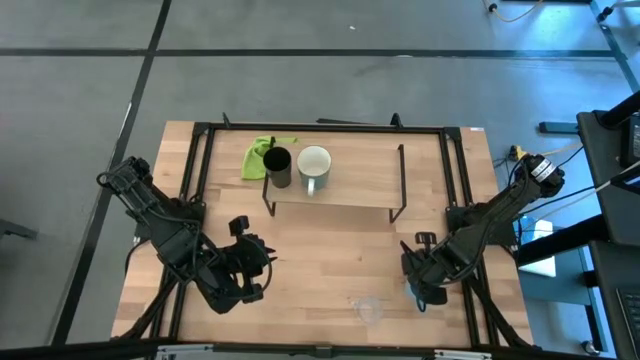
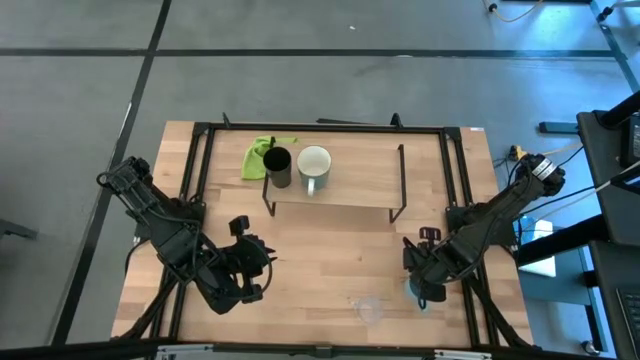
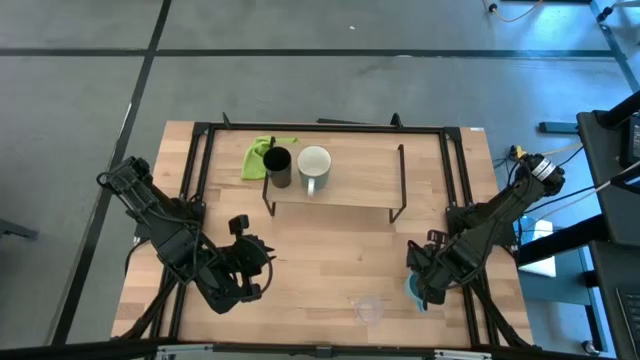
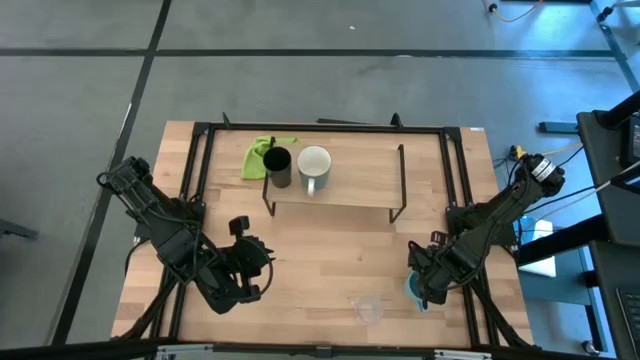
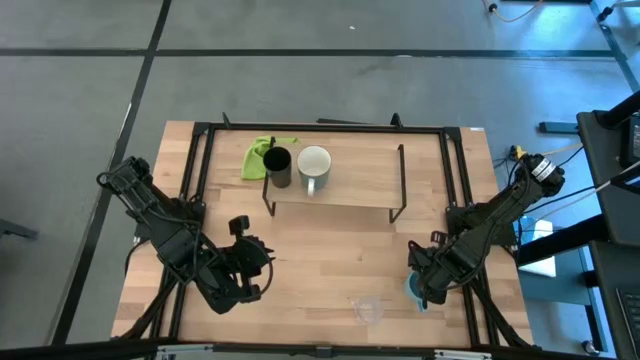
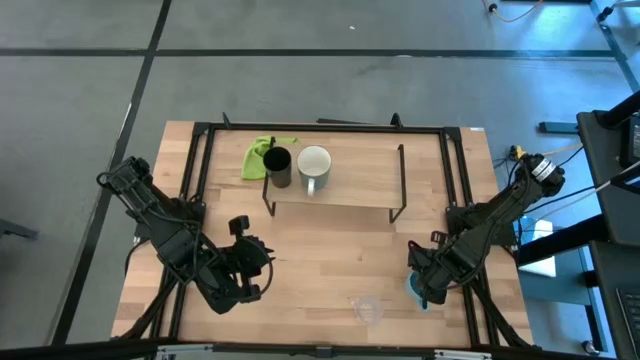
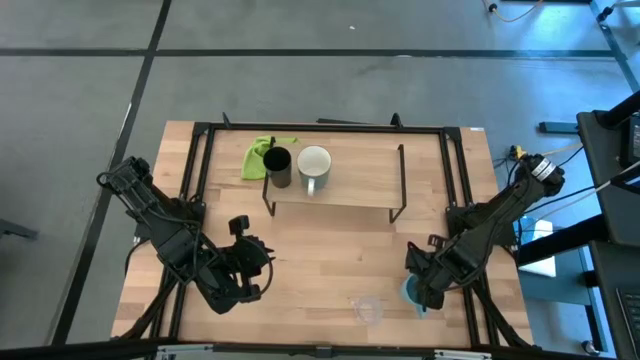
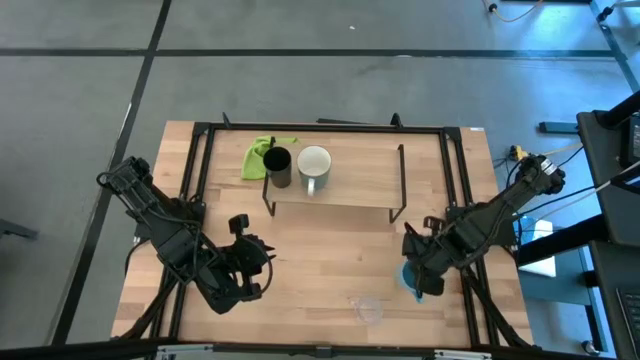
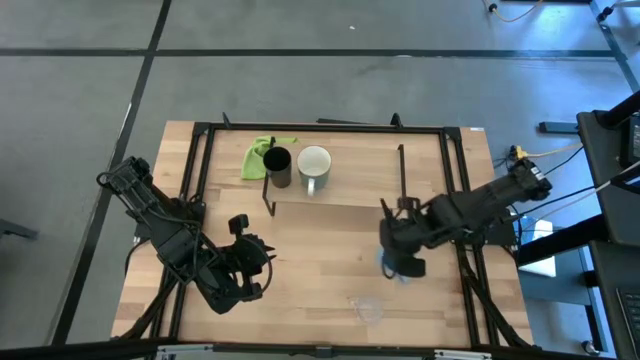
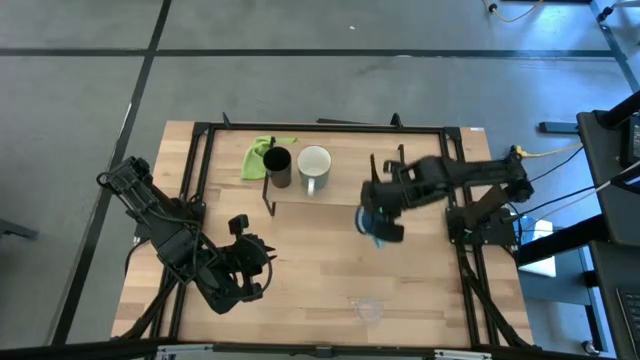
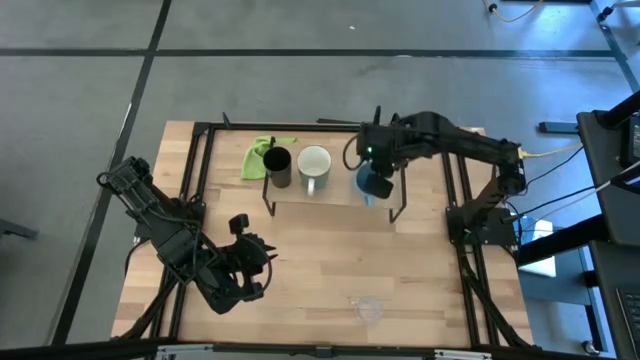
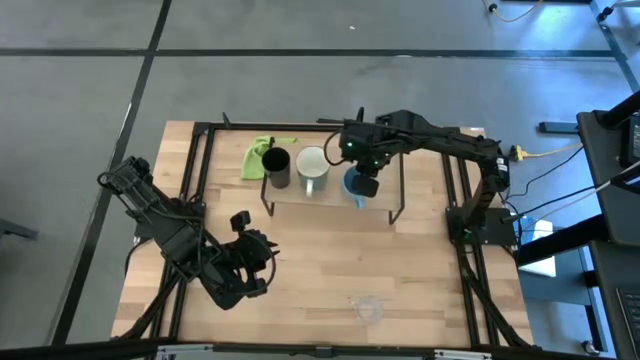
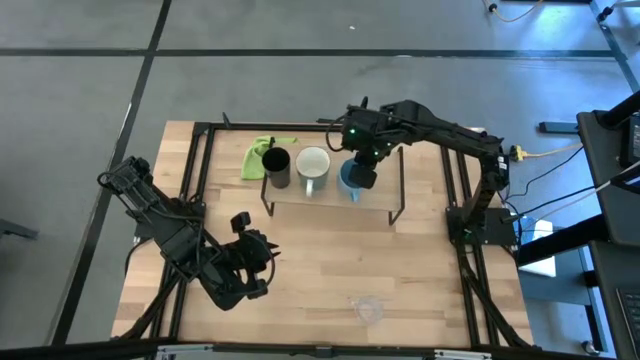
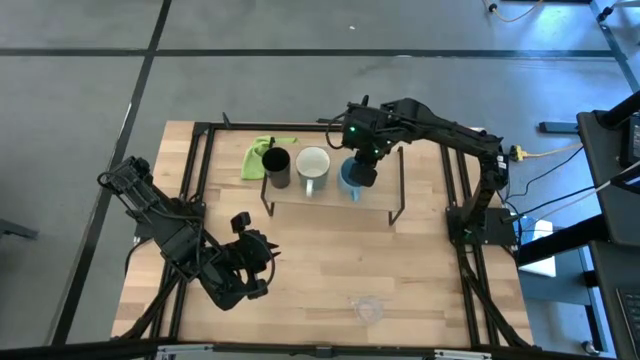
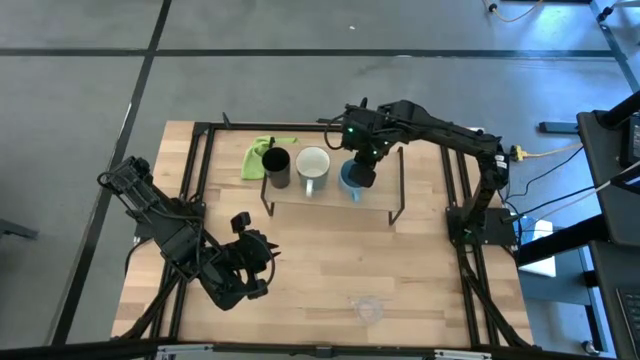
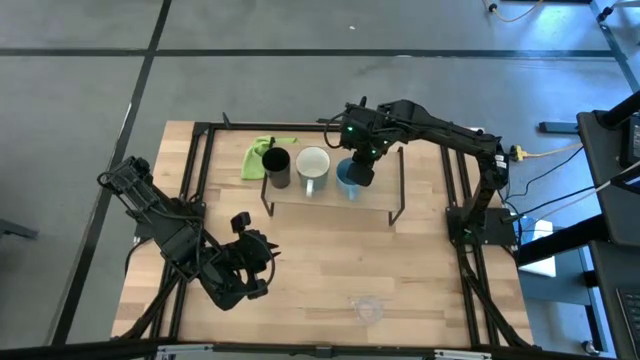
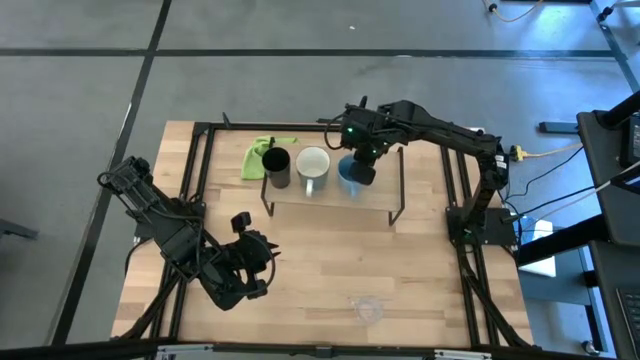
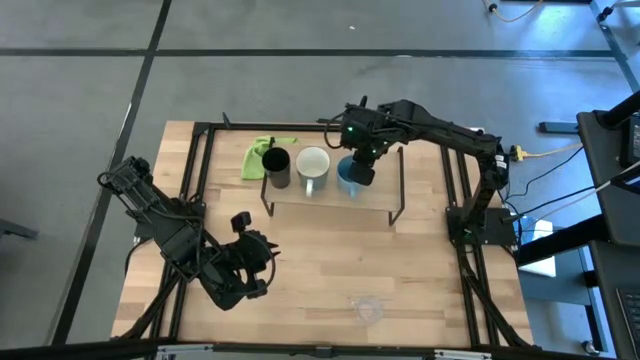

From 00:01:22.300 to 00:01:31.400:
Task: Stack small to large cups/mugs on shelf
Put the blue mug on the shelf

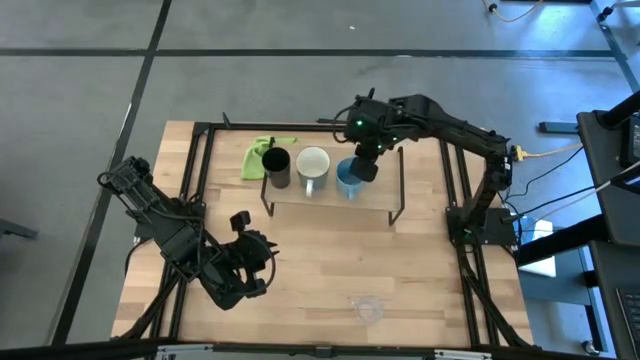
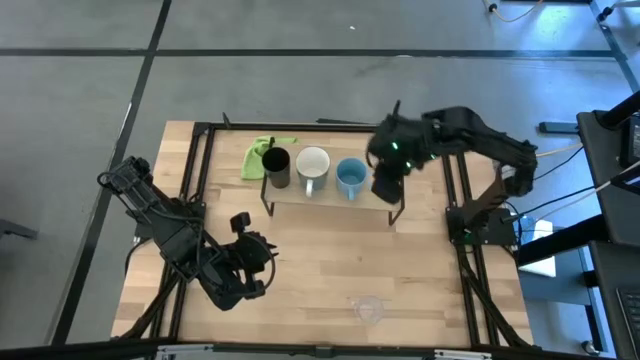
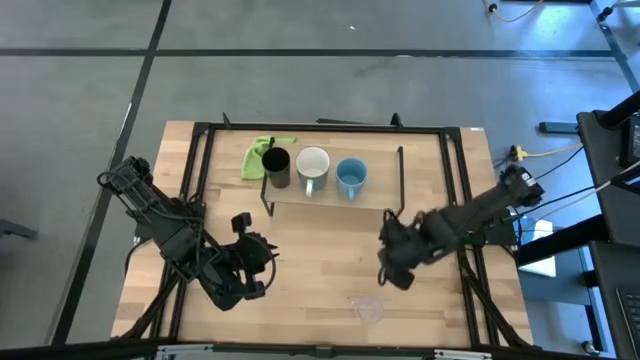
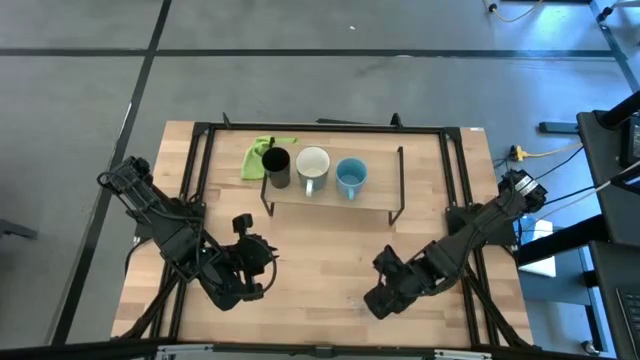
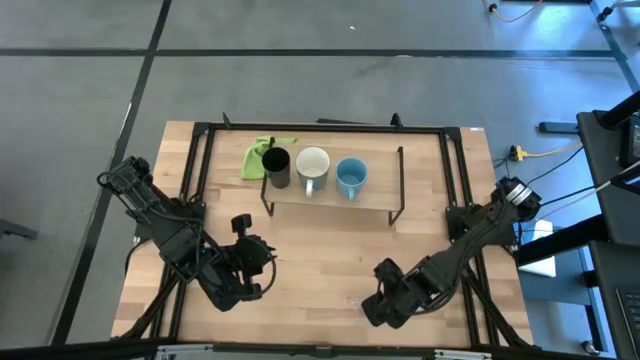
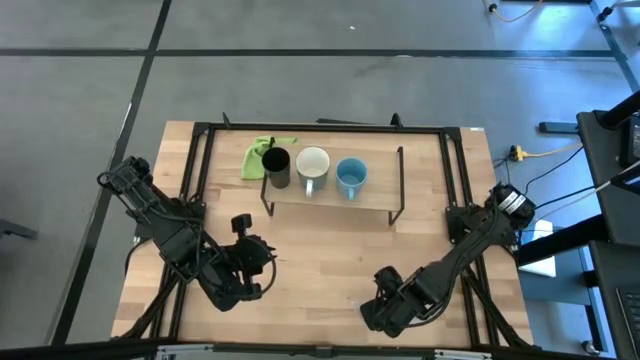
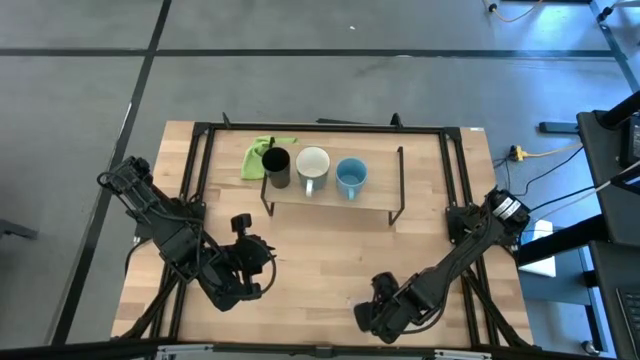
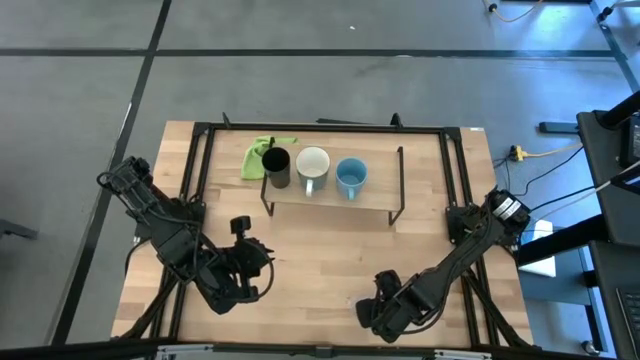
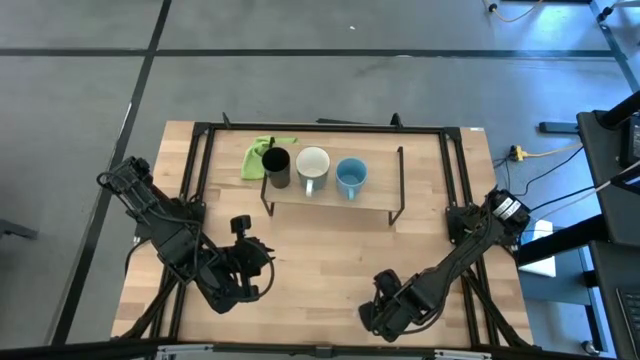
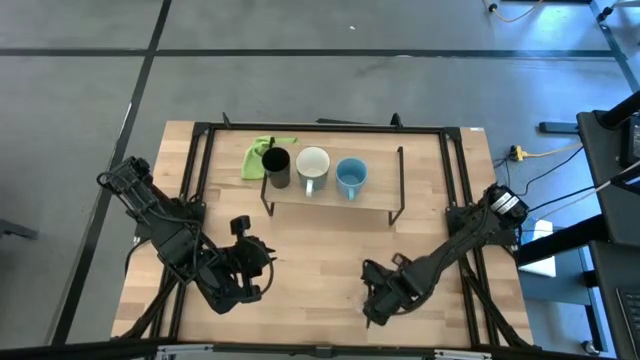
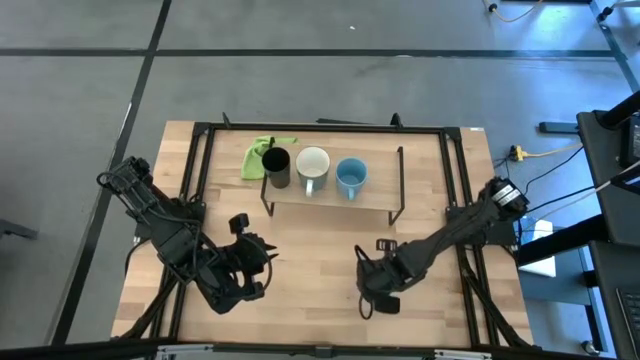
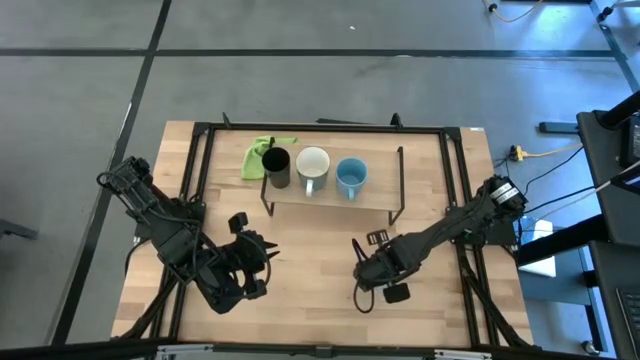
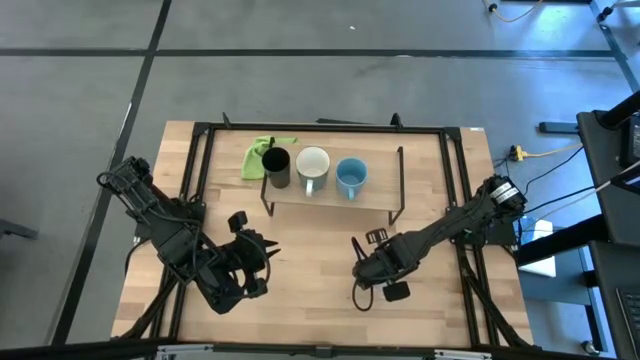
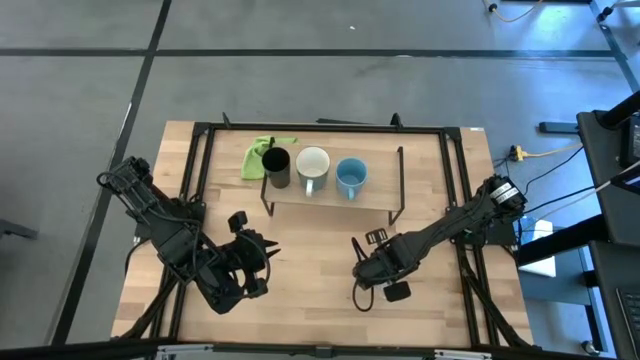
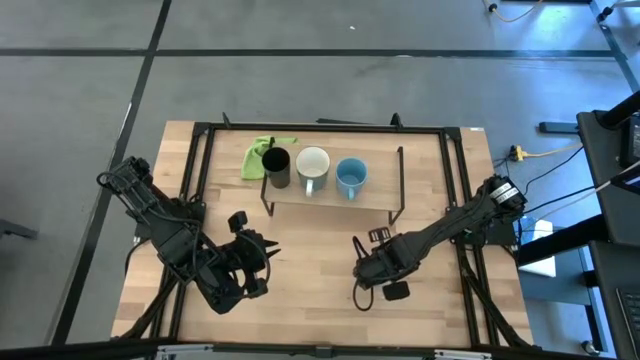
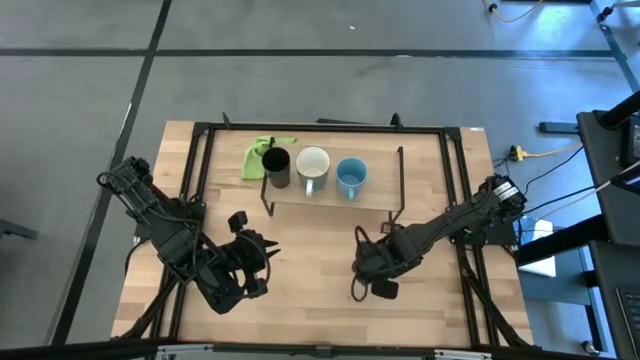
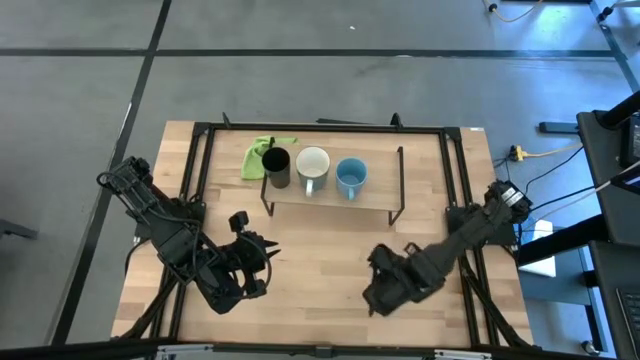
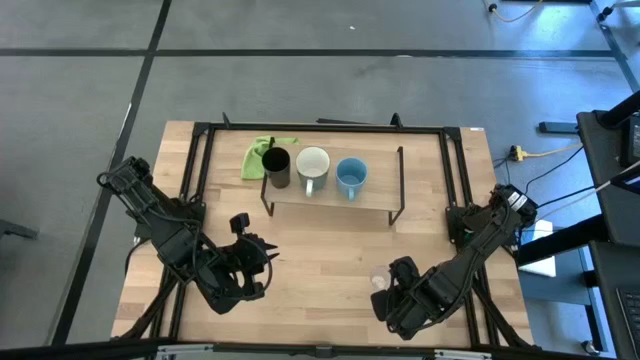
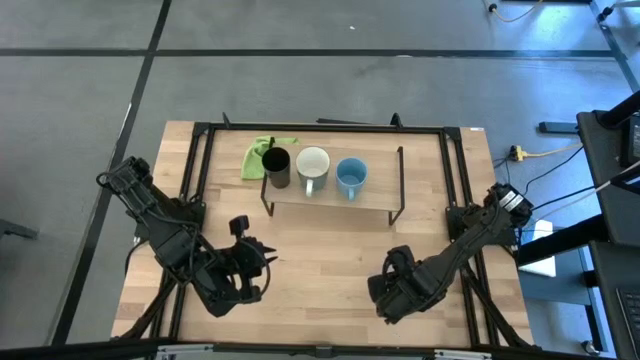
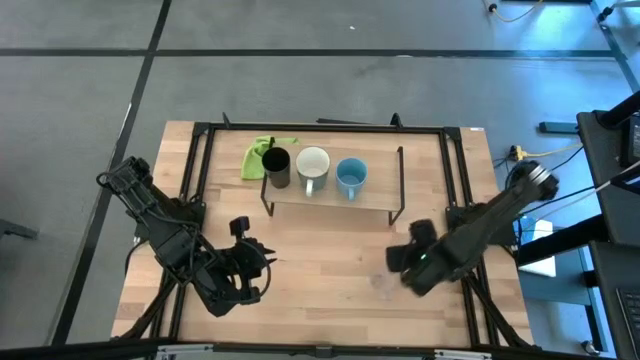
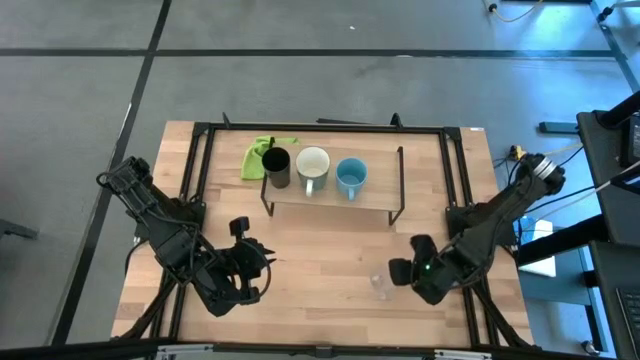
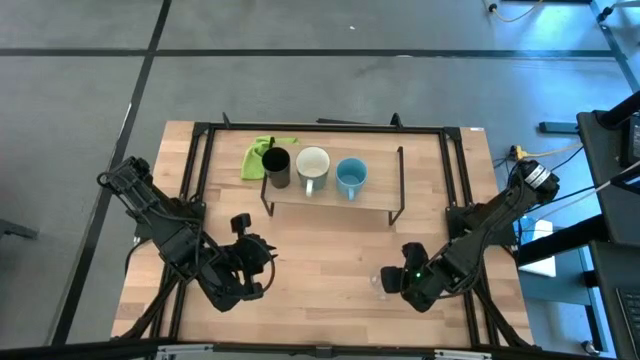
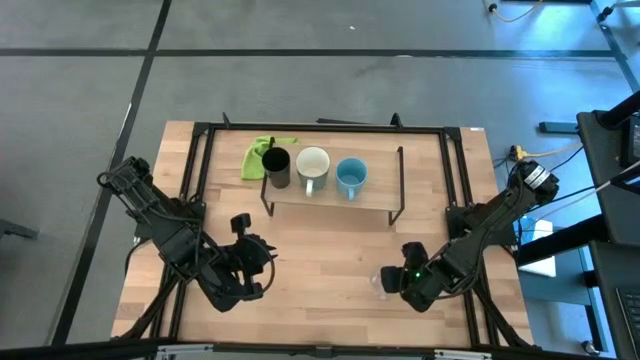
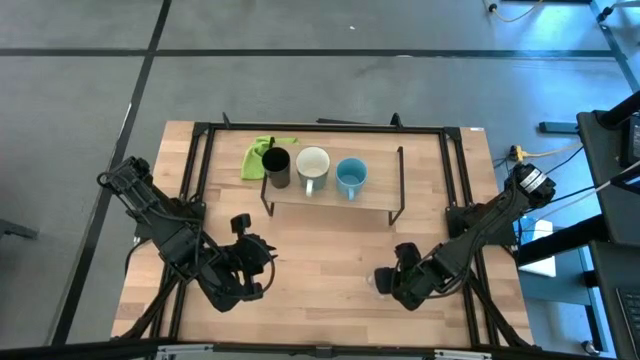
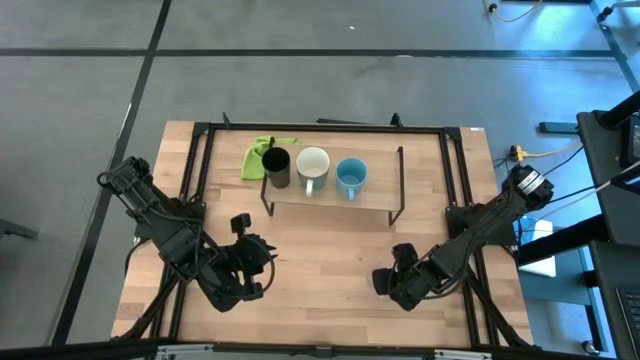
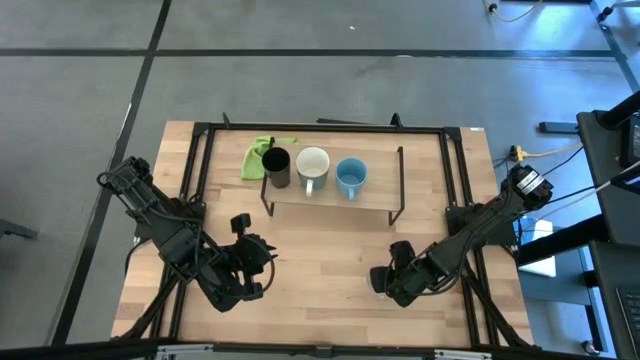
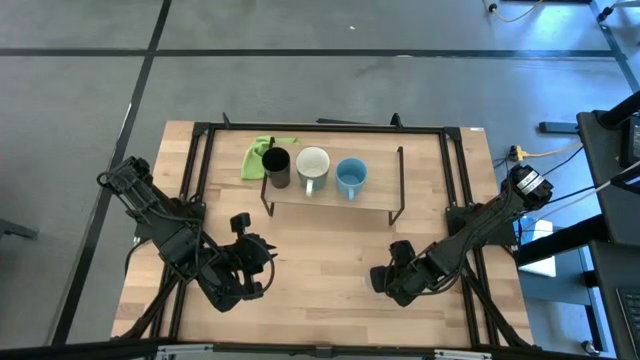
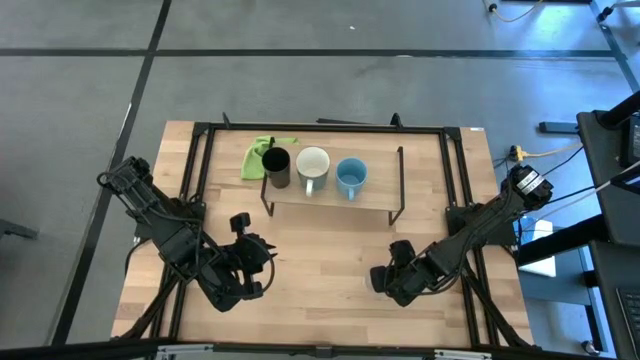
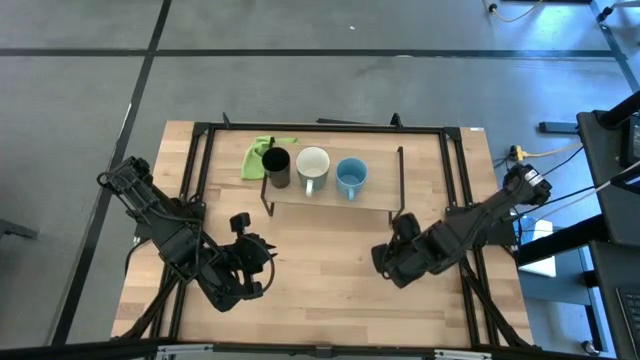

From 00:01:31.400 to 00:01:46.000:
Put the transparent mug on the shelf
